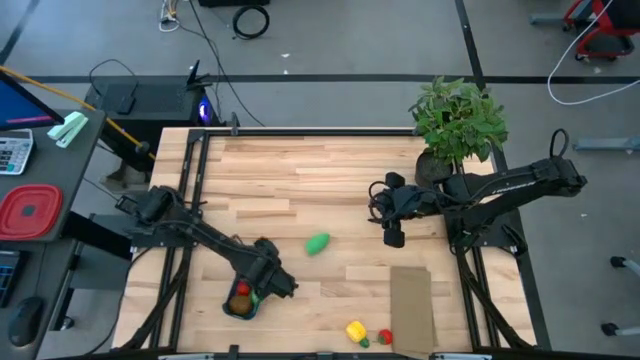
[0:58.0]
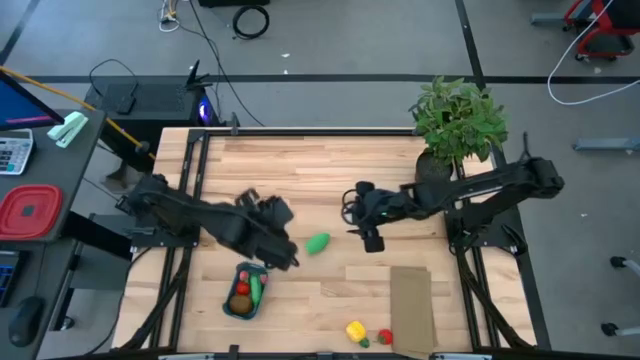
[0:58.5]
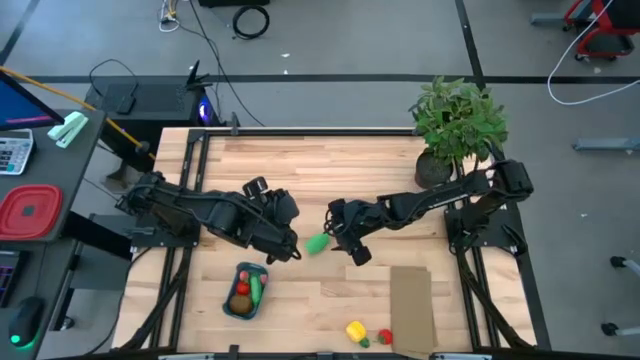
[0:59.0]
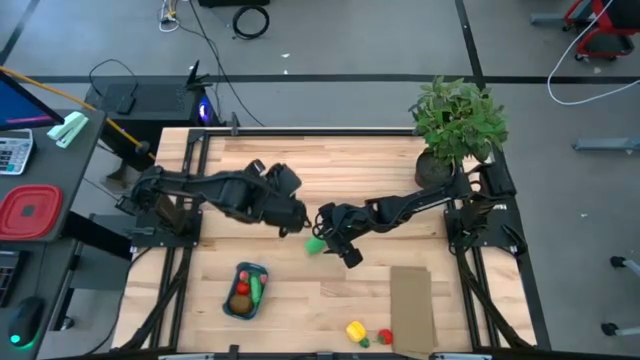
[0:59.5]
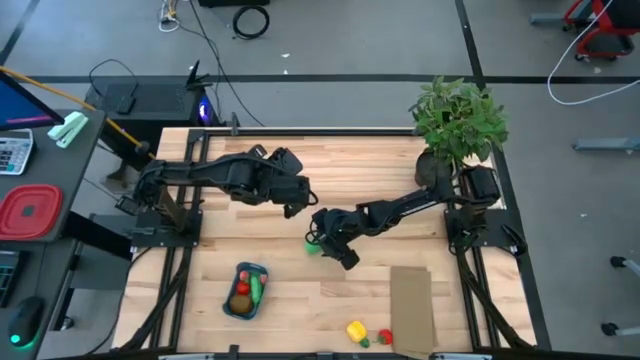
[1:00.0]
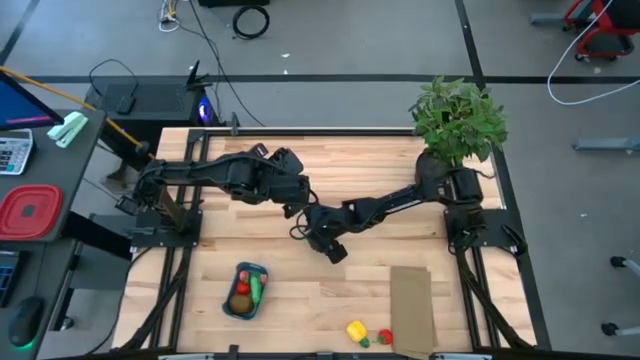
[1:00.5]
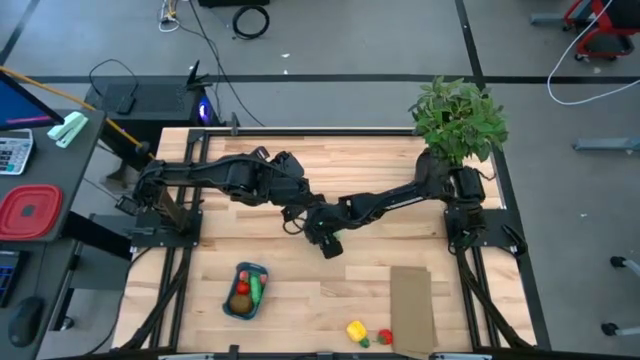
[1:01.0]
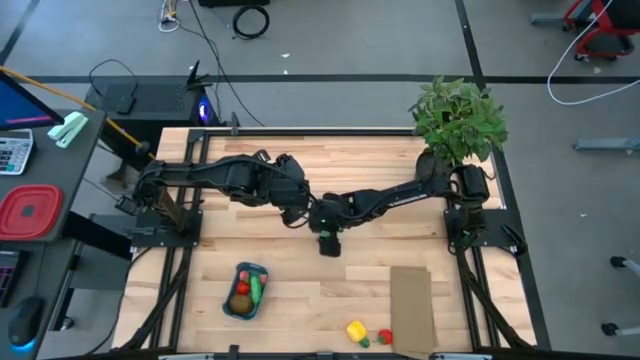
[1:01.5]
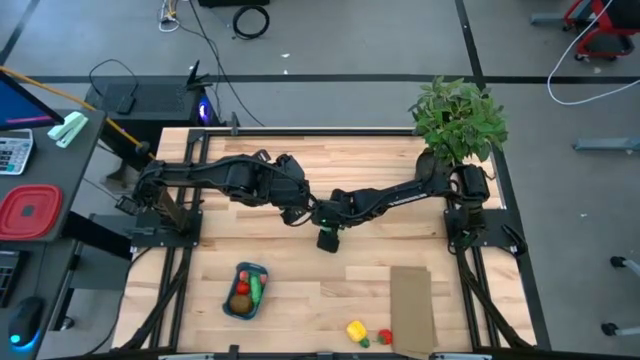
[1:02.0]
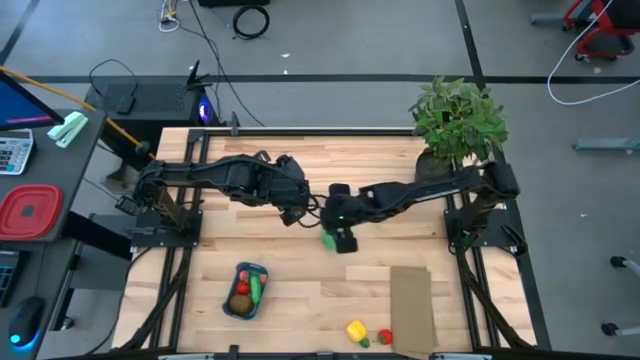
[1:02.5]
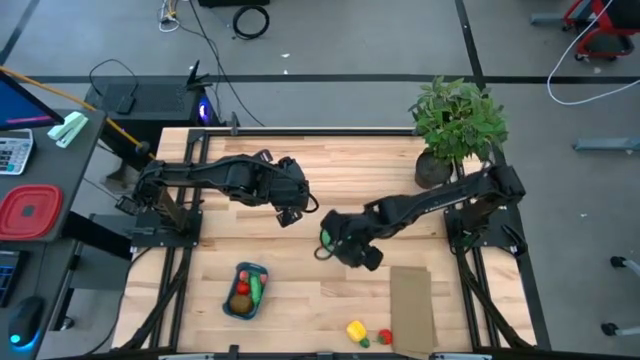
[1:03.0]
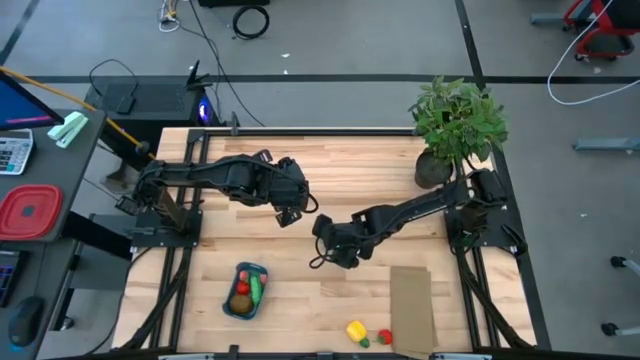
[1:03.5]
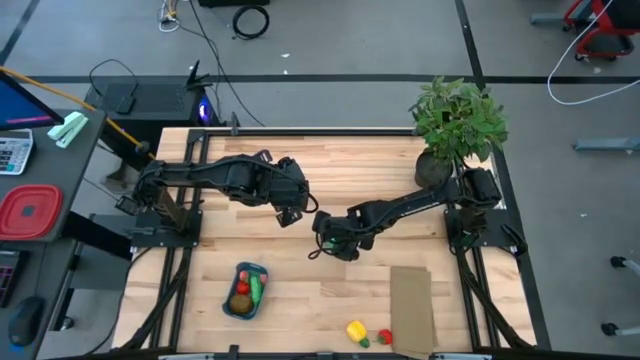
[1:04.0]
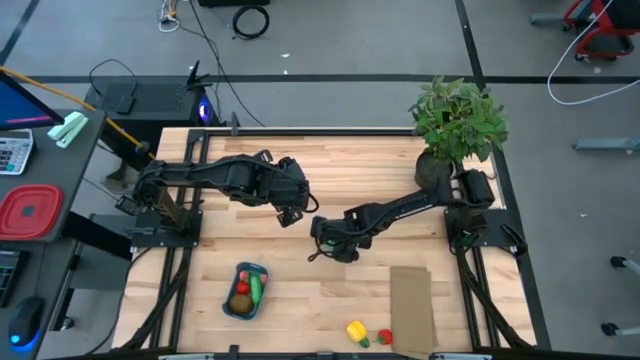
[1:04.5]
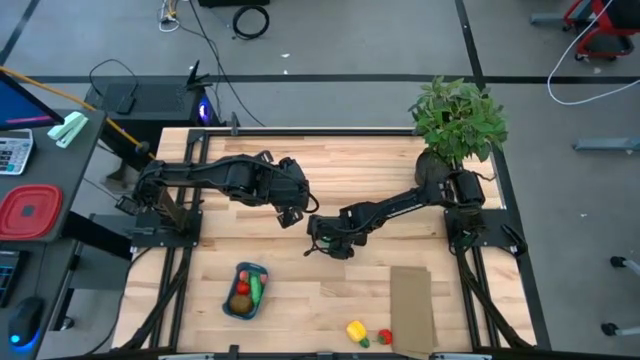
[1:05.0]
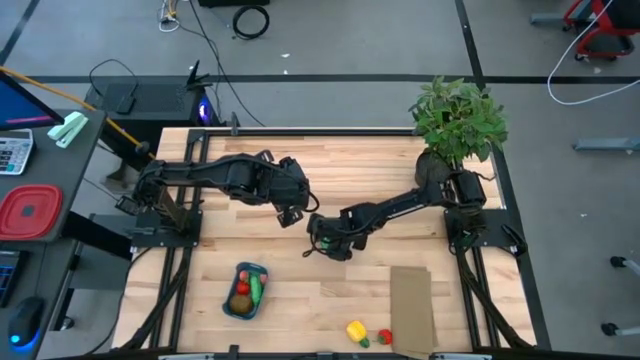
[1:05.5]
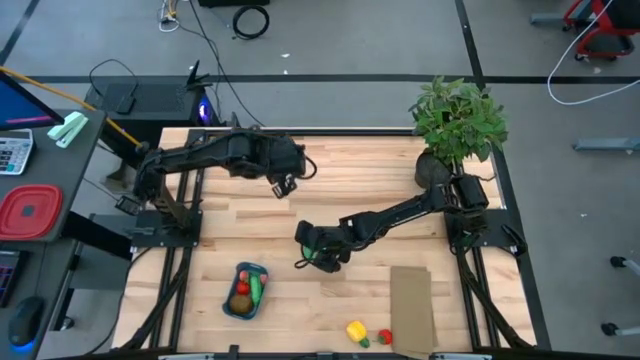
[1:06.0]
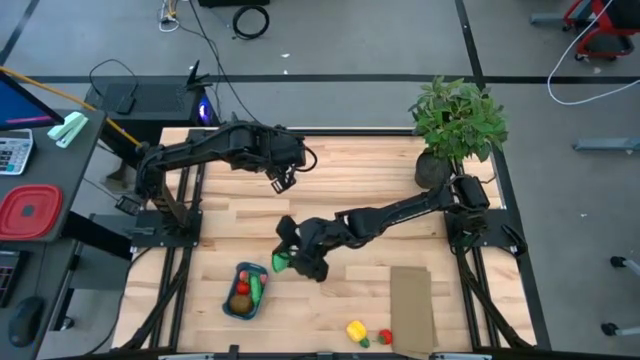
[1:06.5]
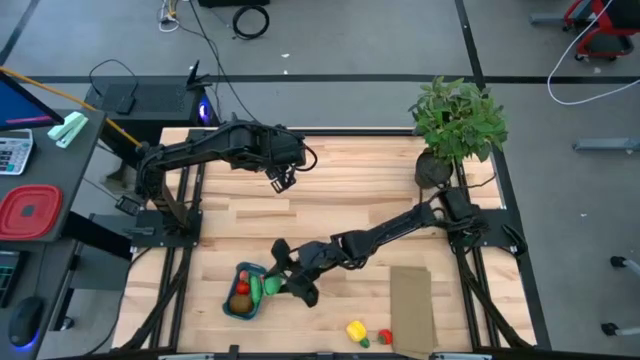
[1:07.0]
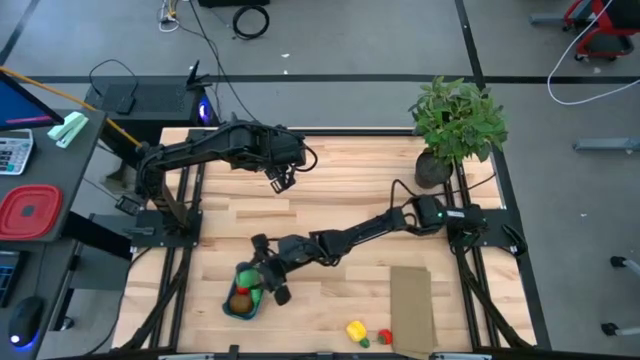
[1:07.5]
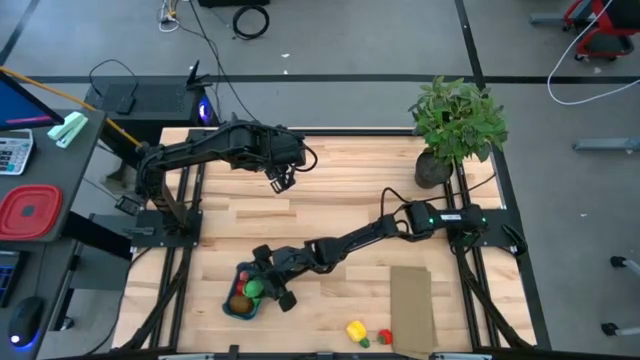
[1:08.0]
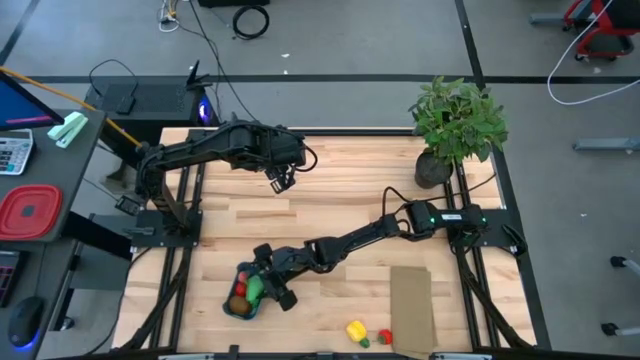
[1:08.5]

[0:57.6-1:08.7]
Task: Pick and placing Produce into tupperware
Put the green corn into the blue bin

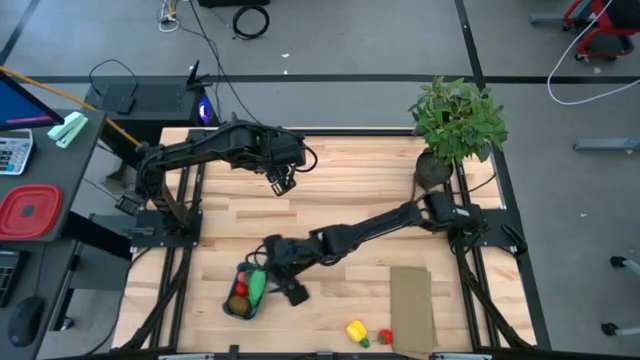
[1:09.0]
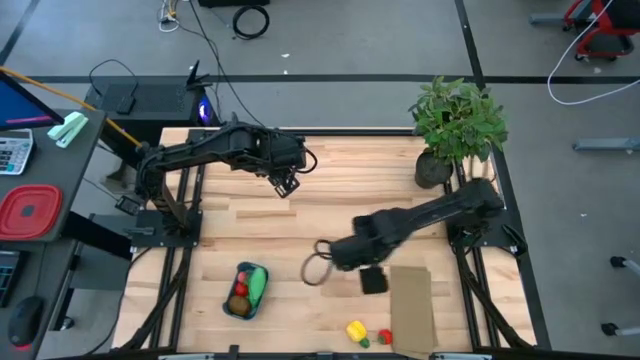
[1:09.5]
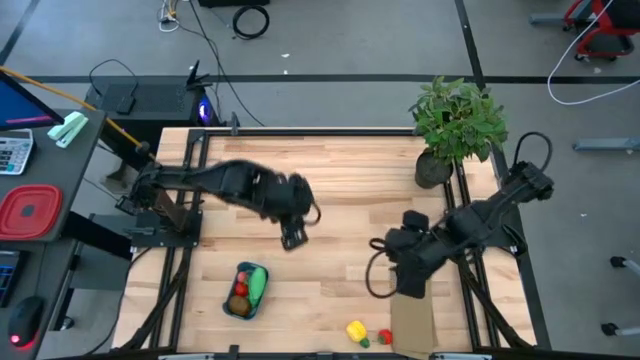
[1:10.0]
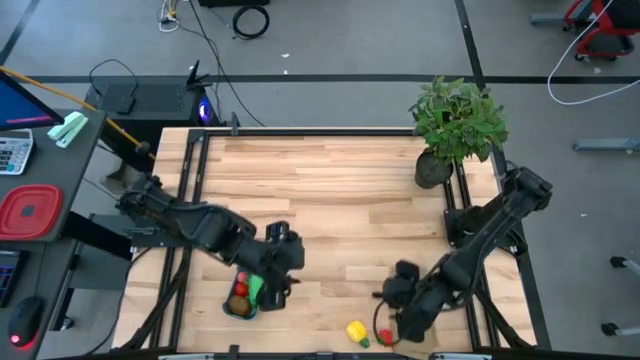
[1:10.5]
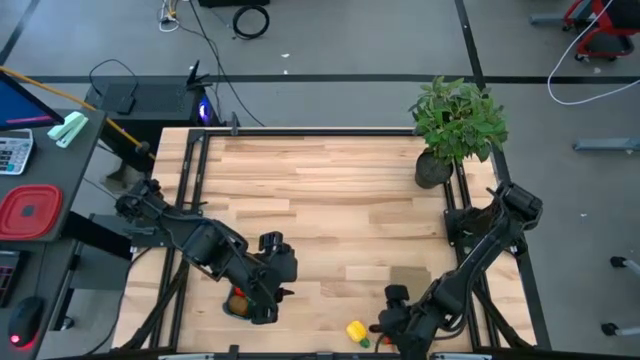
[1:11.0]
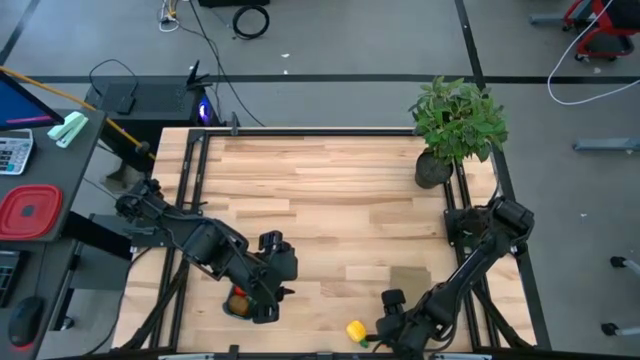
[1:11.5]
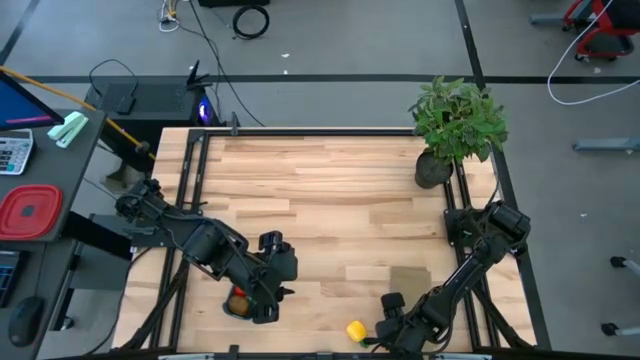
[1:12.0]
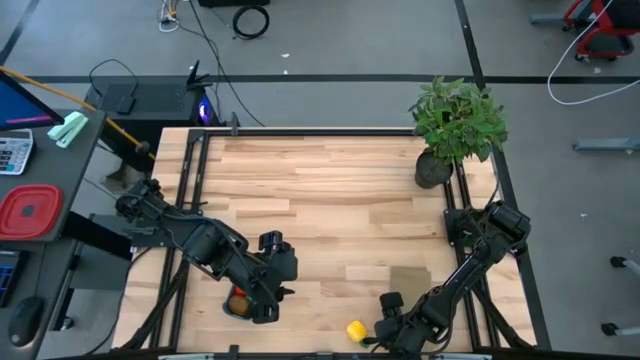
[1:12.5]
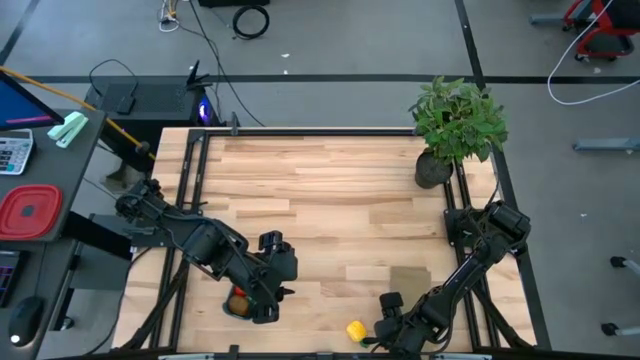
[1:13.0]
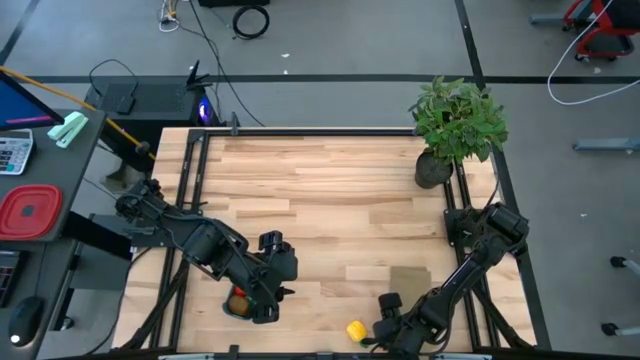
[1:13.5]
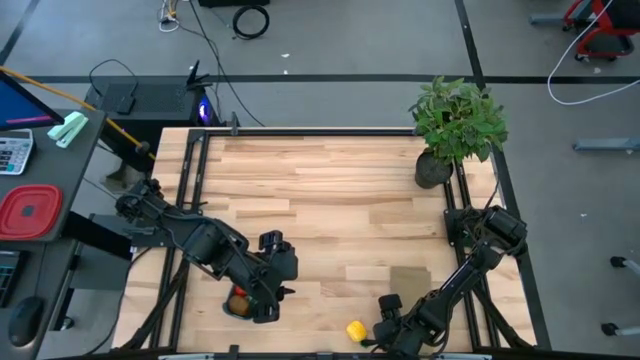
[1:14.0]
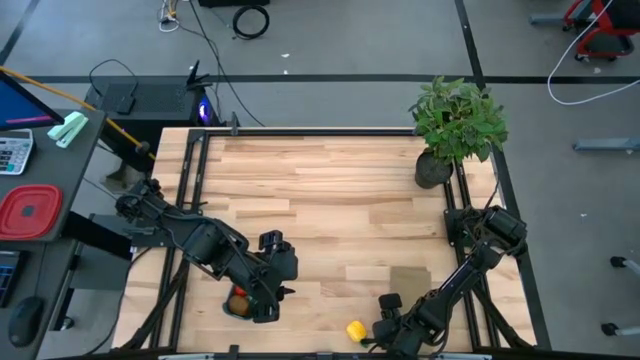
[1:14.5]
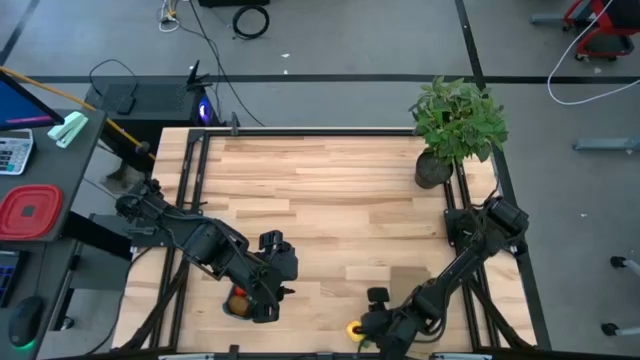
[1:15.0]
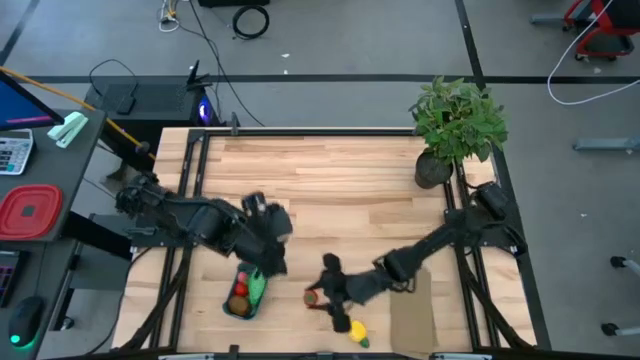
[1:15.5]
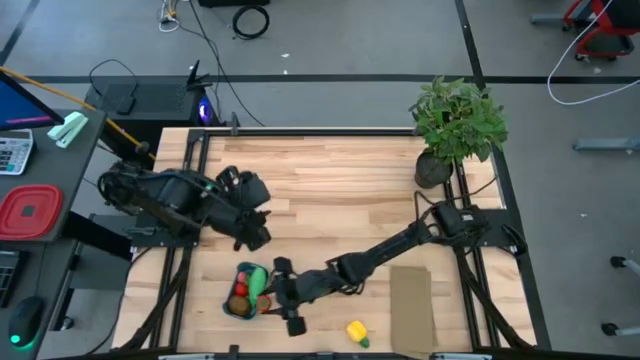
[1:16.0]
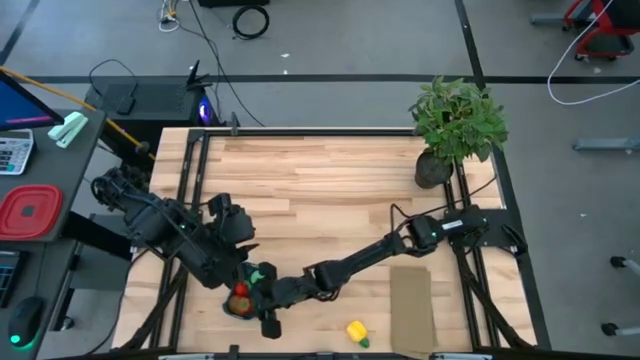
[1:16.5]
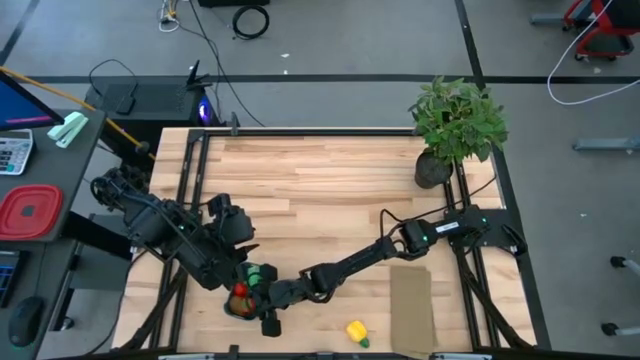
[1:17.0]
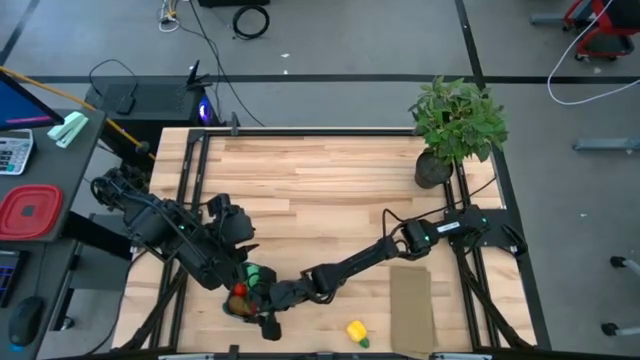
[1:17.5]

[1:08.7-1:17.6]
Put the red strawberry into the blue bin

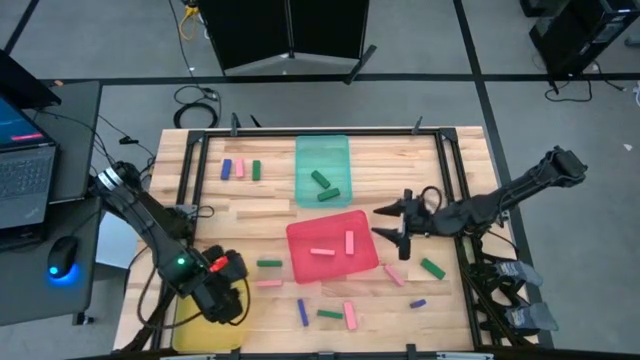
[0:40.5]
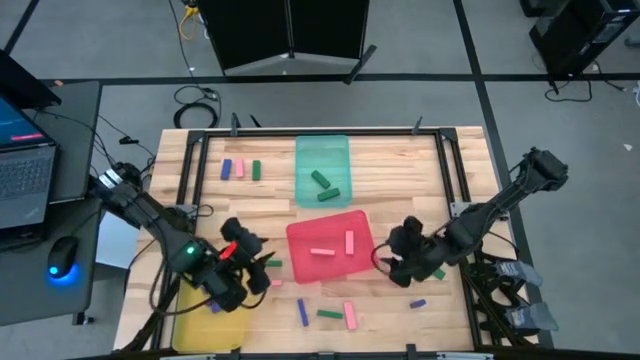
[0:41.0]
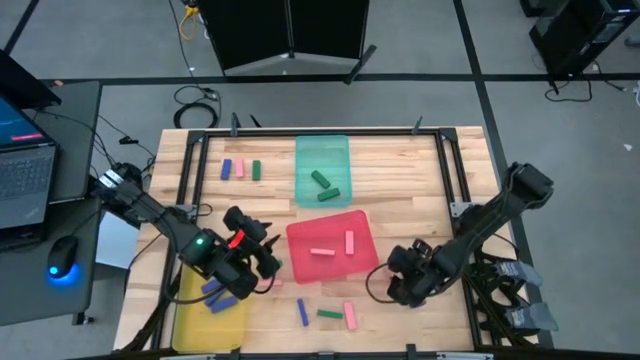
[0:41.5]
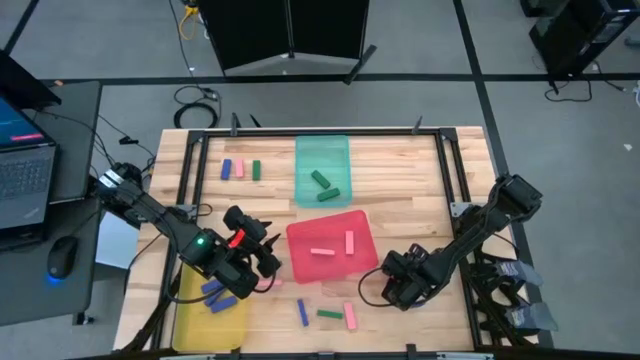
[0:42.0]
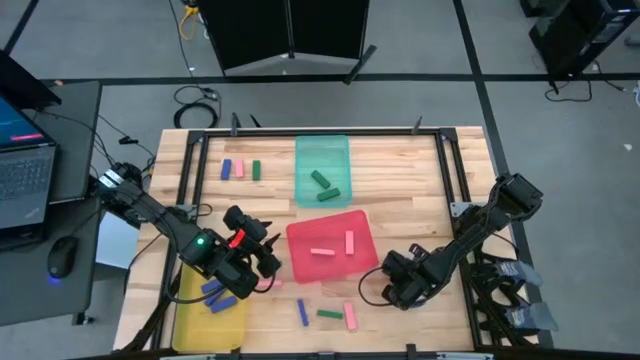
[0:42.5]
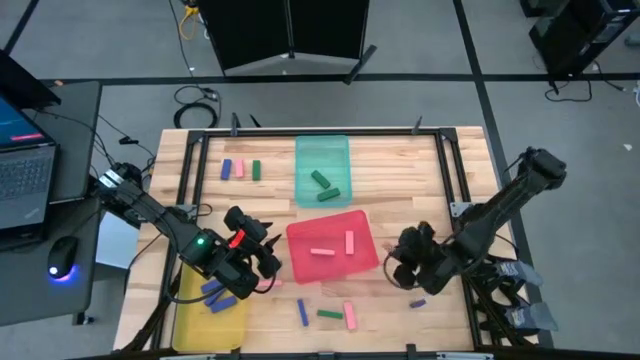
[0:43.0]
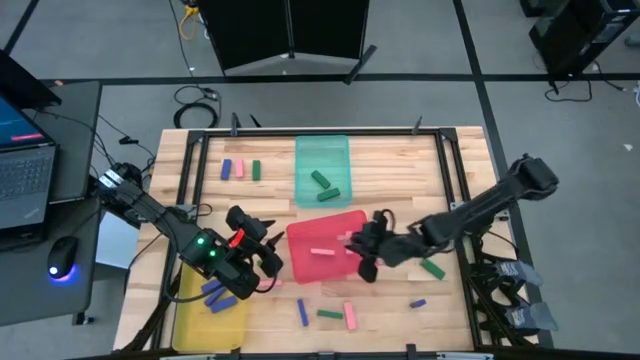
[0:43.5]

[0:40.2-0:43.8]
Task: Sort blocks
Put the pink block into the pink bin
